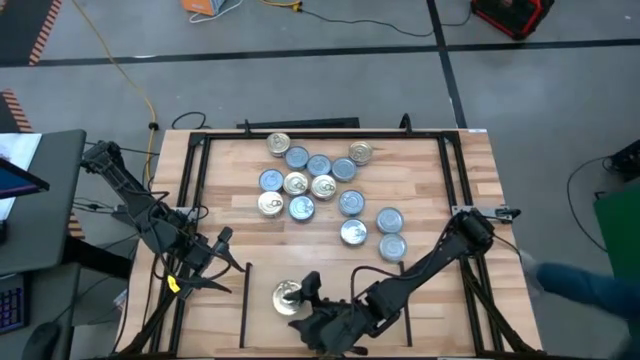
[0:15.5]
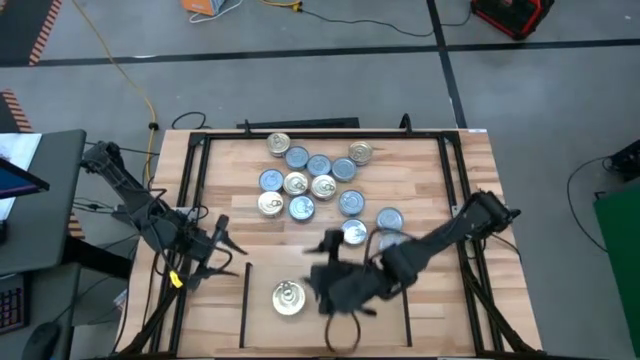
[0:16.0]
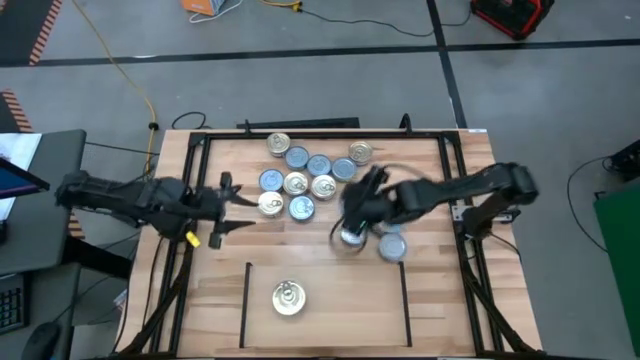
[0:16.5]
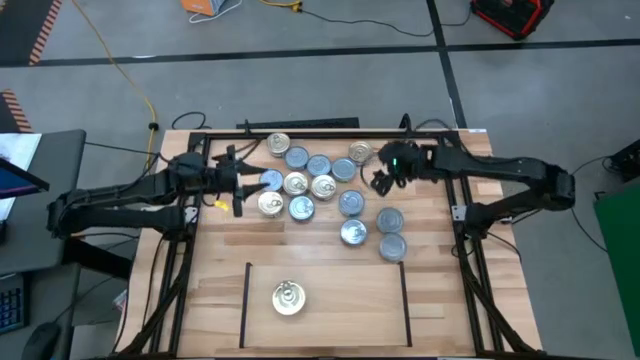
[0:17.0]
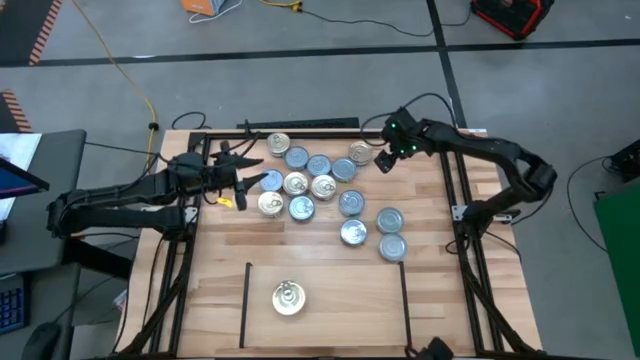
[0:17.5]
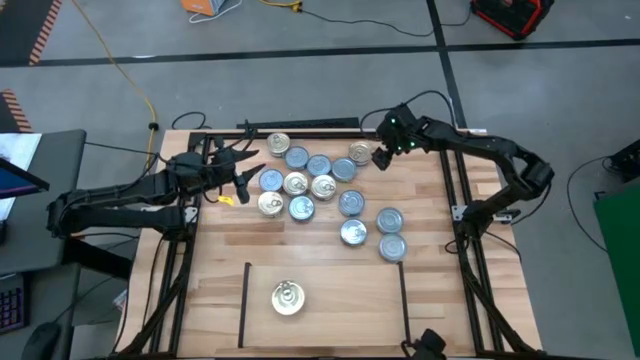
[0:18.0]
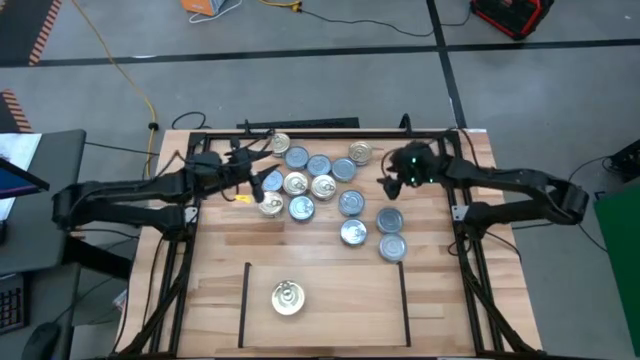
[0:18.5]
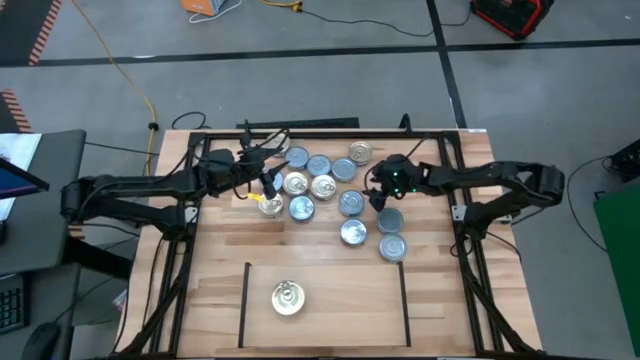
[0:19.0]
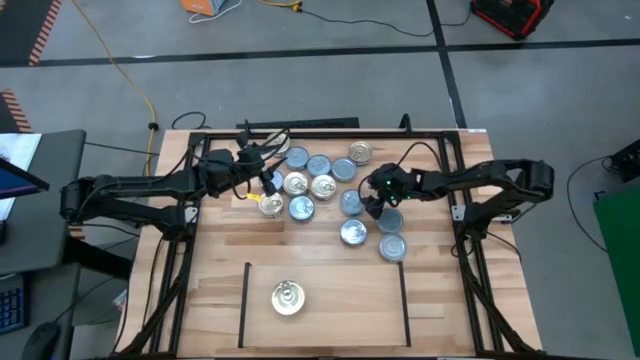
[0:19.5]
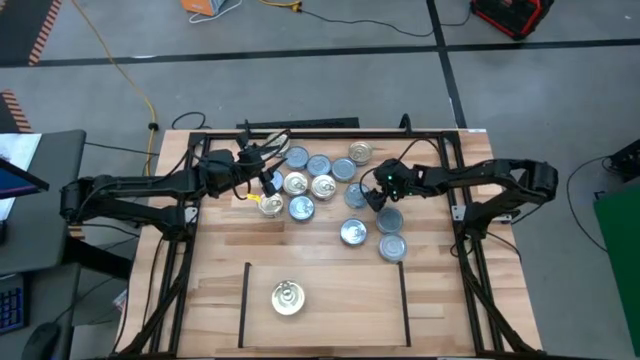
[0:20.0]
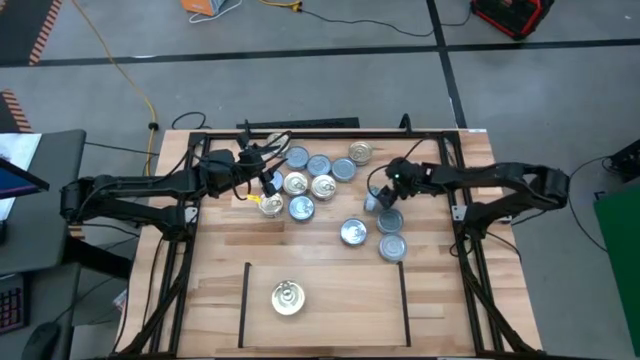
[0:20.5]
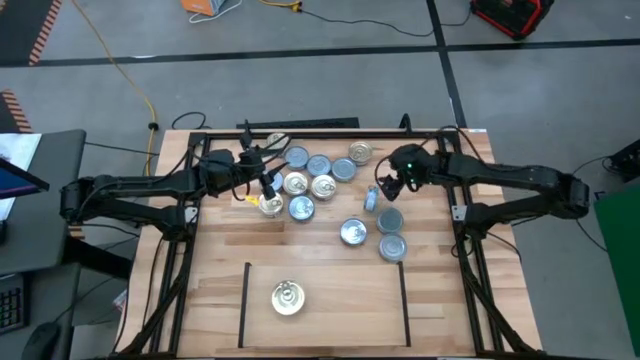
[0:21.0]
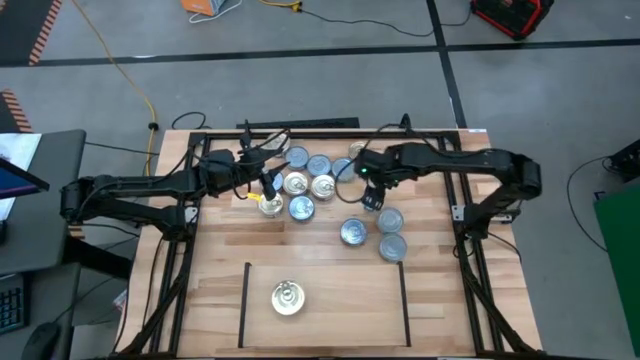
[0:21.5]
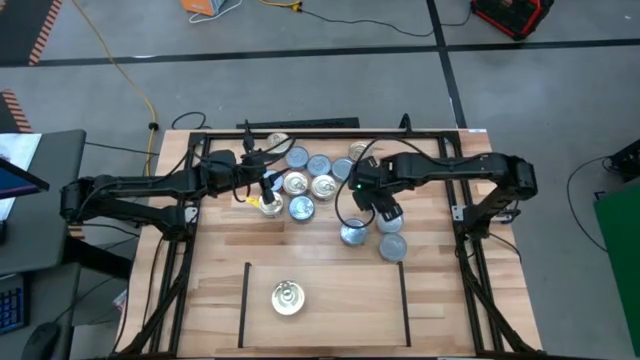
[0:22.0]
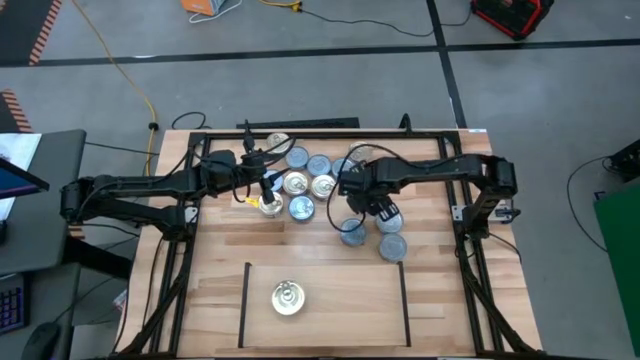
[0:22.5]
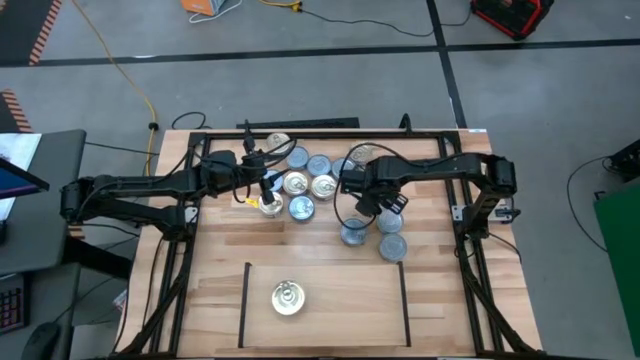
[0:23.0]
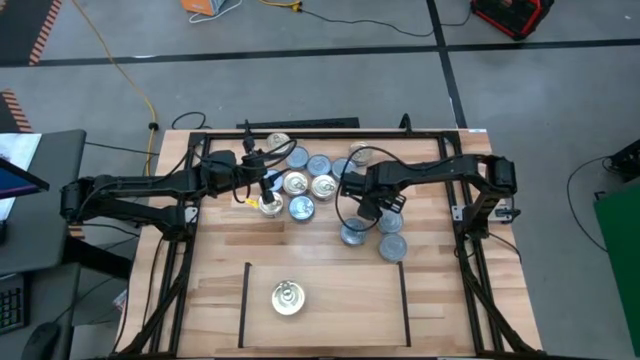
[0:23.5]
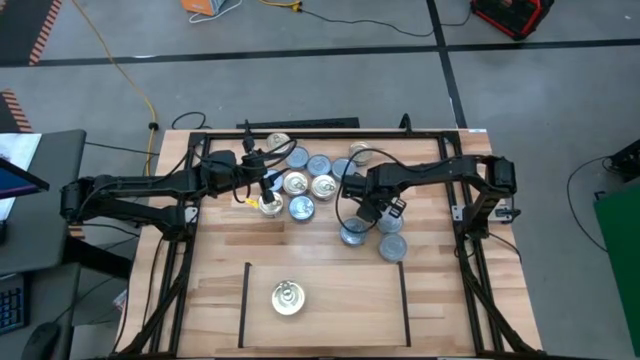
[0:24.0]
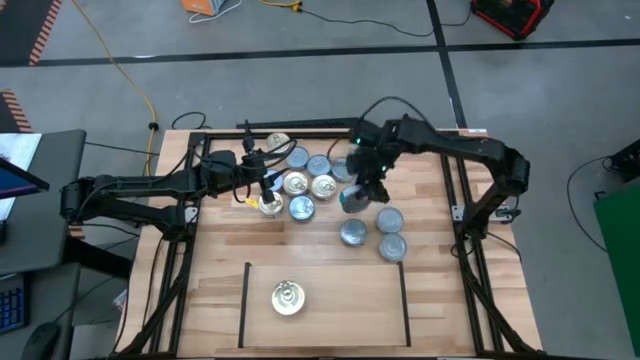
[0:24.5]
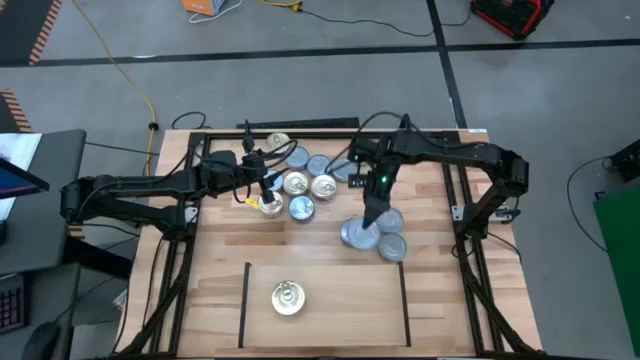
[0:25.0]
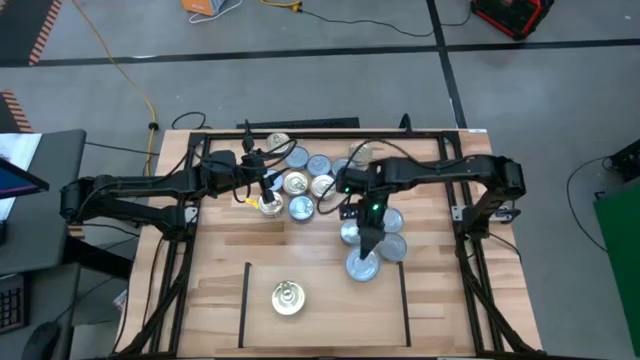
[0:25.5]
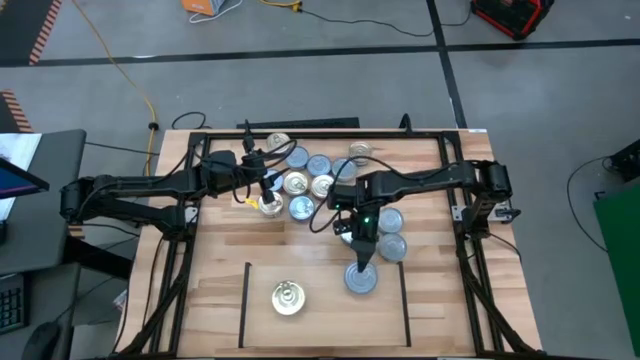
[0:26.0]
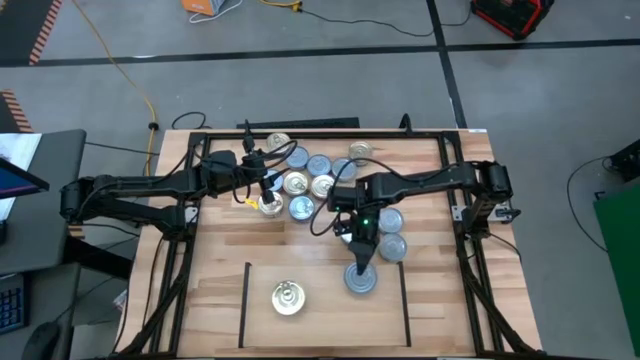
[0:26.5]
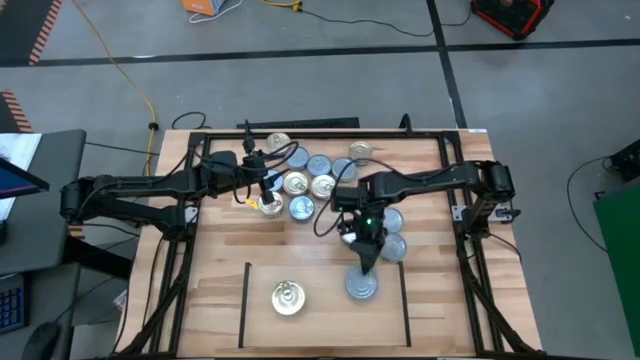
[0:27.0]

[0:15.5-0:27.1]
Task: Stack canned seafood by type on shelf
Put the yellow and blue tuna can on the shelf

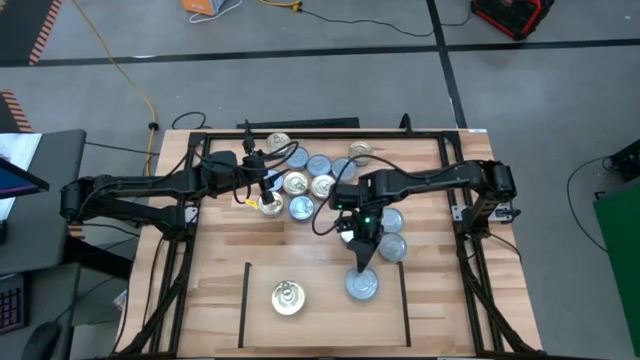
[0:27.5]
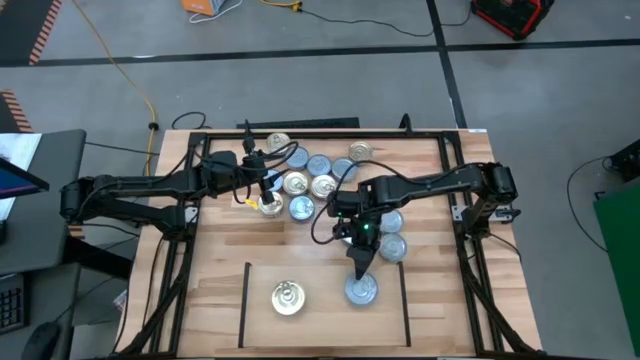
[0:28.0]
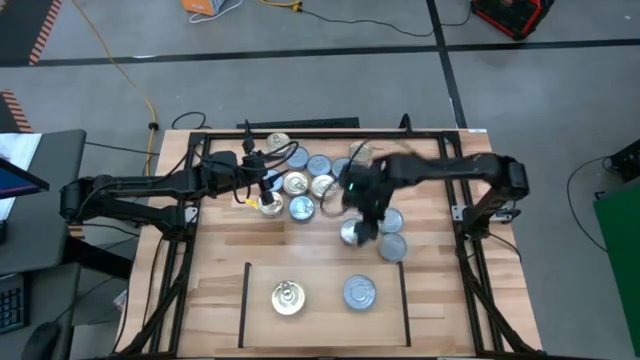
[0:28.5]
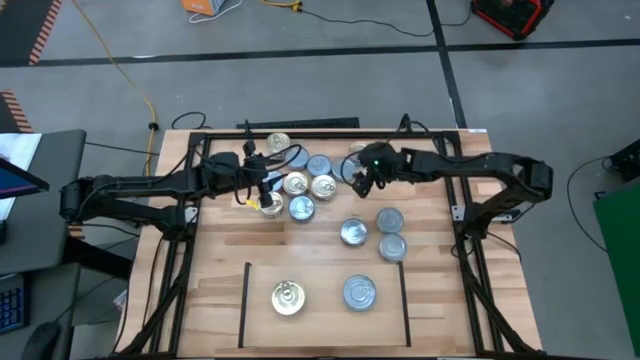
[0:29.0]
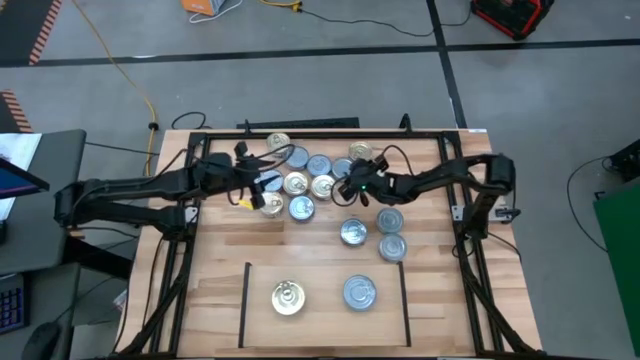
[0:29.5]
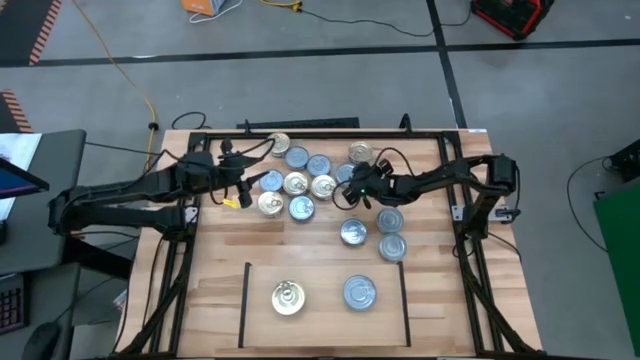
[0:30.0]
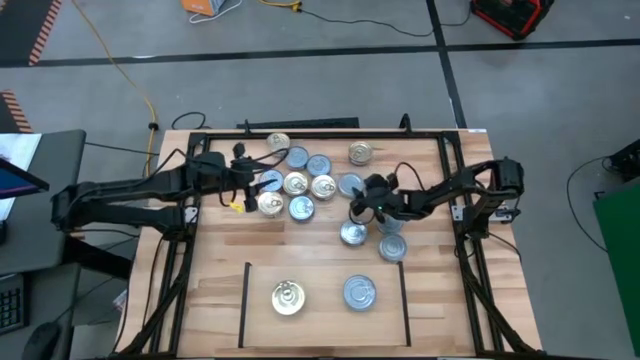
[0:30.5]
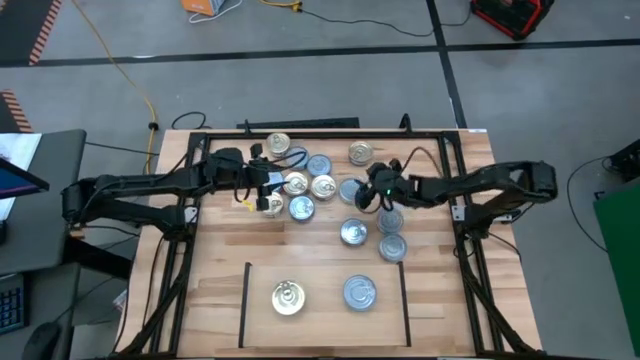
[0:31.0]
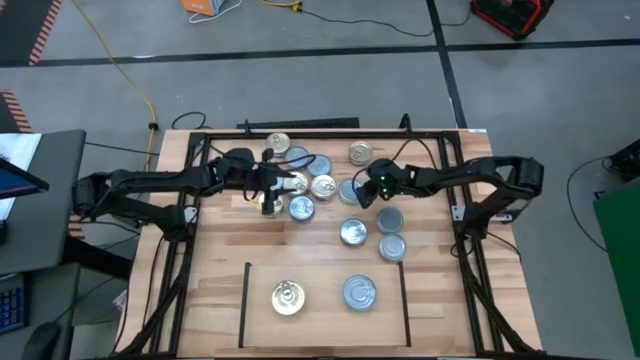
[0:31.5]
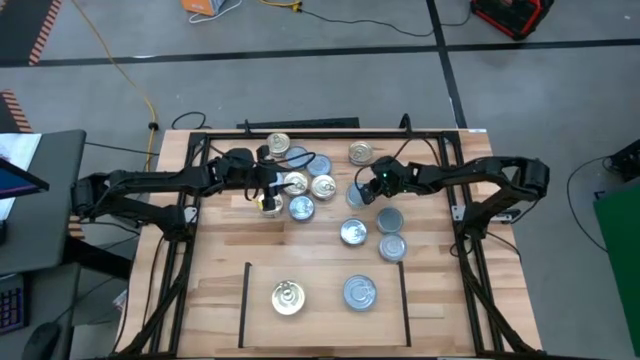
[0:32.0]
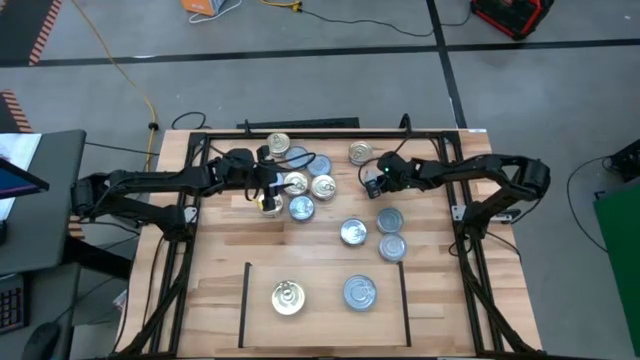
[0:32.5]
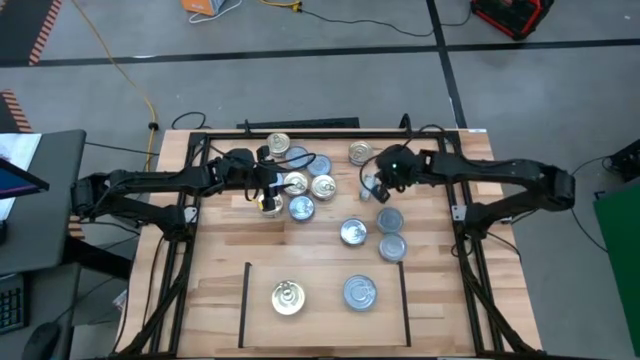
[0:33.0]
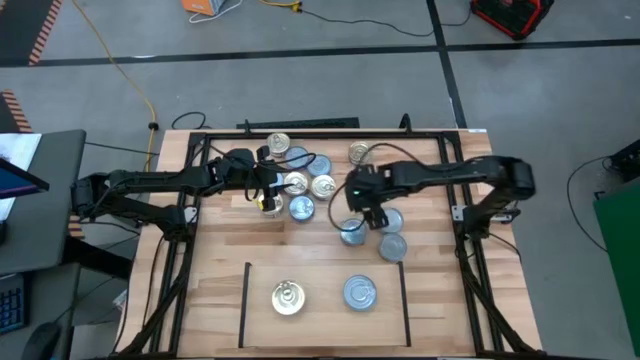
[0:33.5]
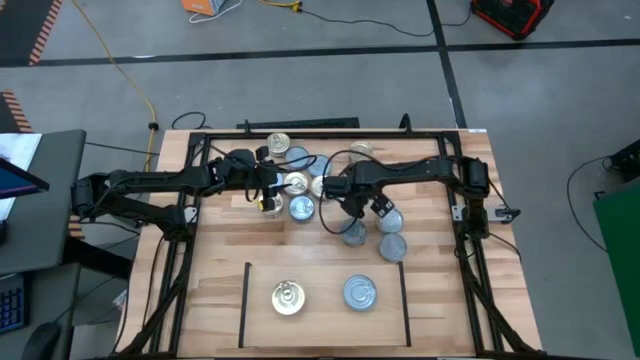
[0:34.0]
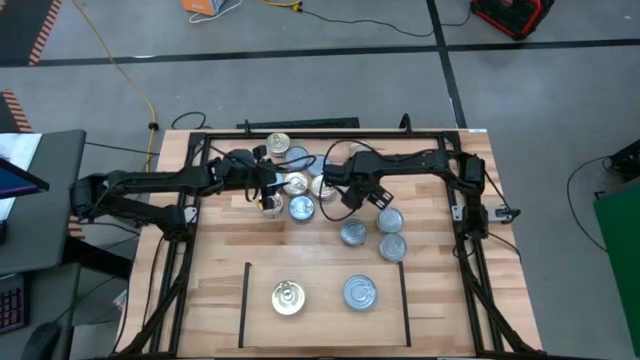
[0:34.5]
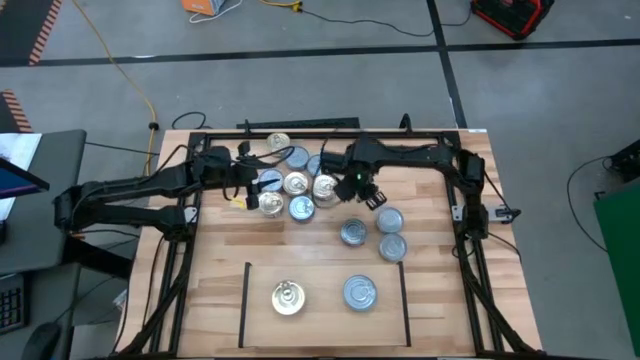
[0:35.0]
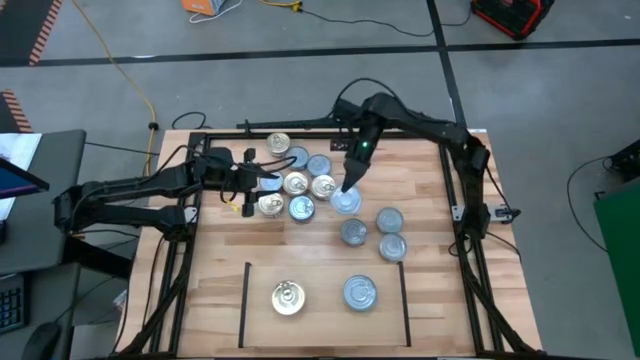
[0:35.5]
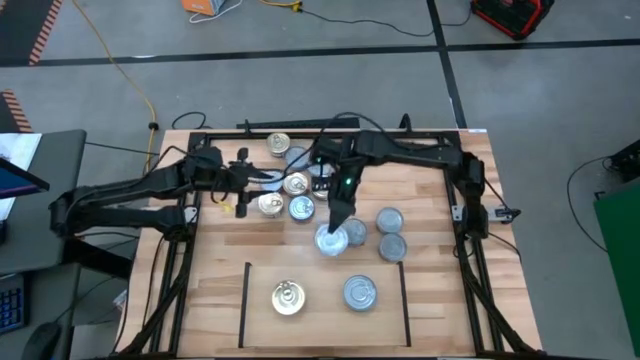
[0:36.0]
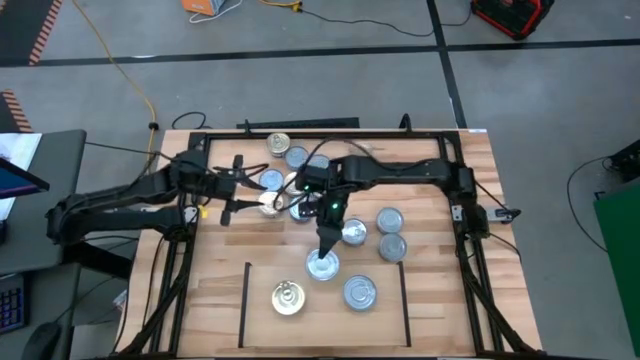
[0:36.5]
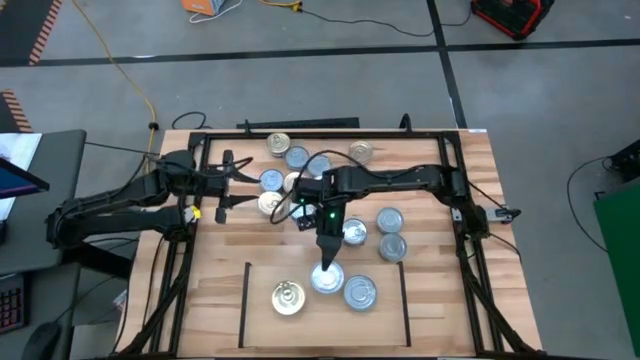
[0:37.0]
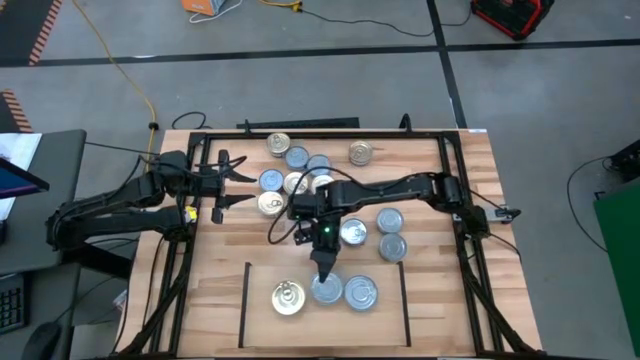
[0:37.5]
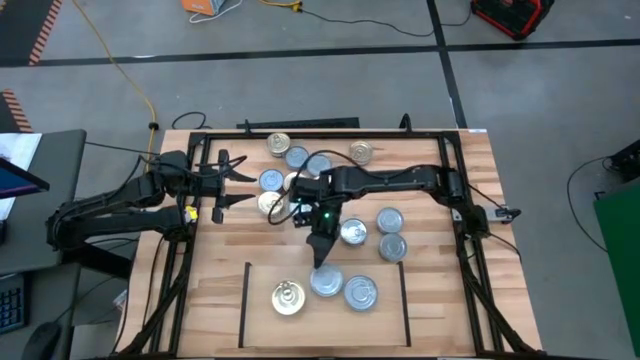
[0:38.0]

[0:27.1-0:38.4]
Put the top green and white tuna can on the shelf
